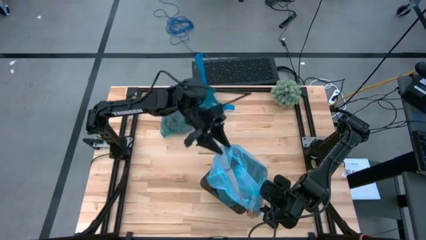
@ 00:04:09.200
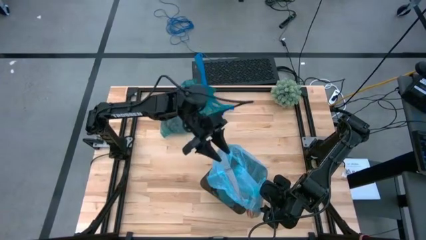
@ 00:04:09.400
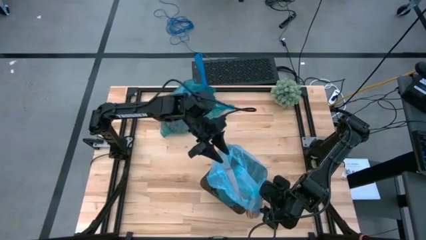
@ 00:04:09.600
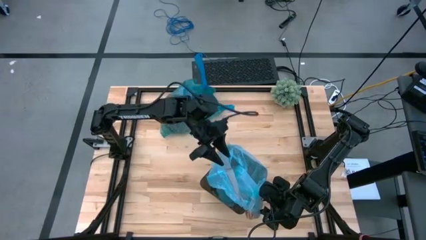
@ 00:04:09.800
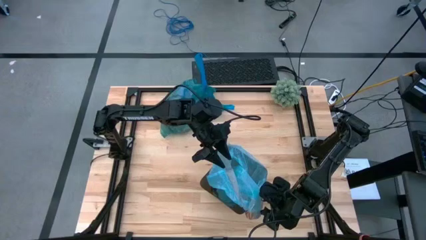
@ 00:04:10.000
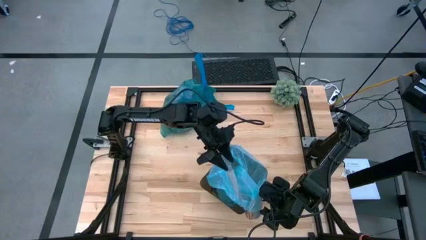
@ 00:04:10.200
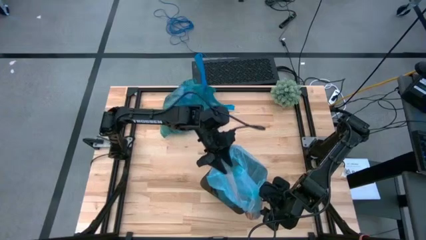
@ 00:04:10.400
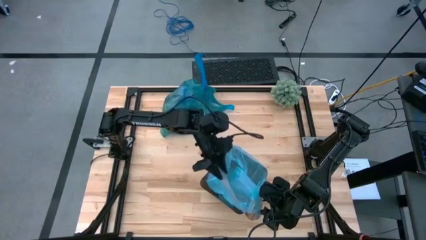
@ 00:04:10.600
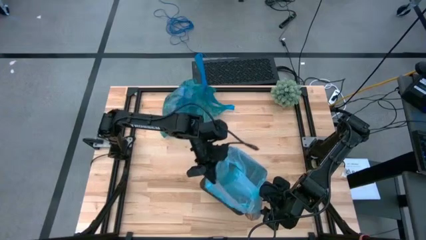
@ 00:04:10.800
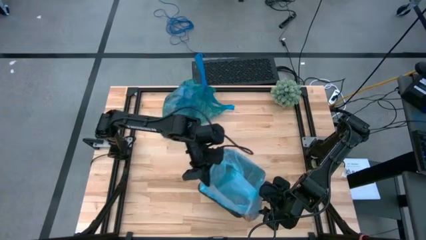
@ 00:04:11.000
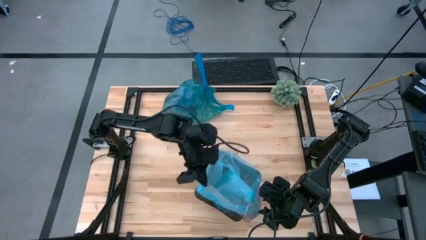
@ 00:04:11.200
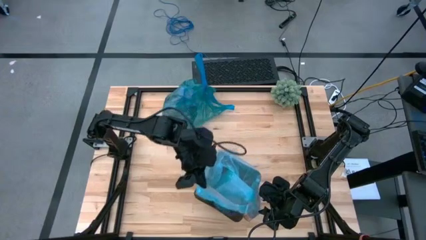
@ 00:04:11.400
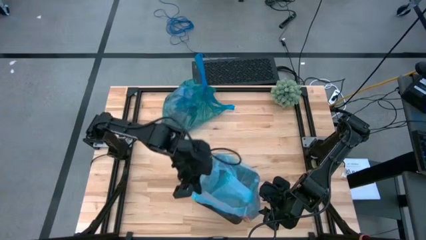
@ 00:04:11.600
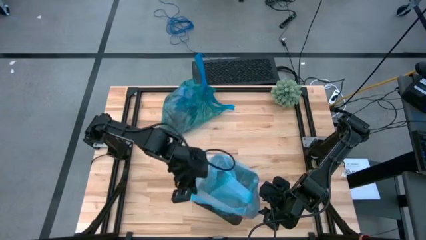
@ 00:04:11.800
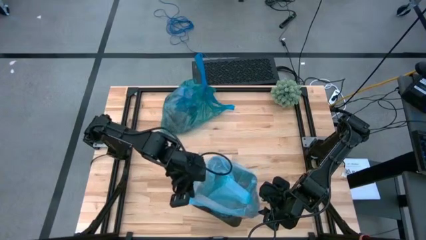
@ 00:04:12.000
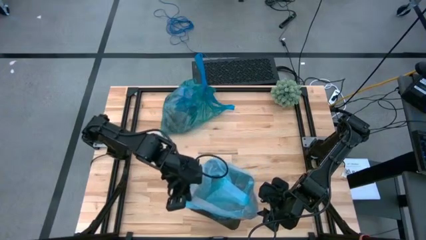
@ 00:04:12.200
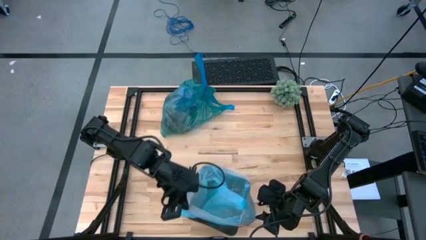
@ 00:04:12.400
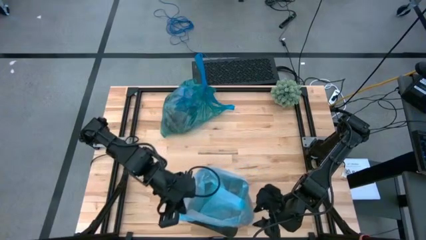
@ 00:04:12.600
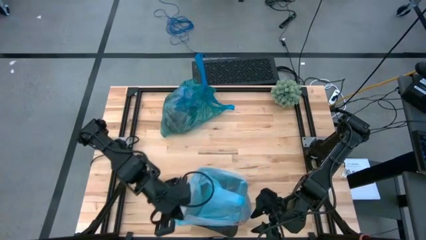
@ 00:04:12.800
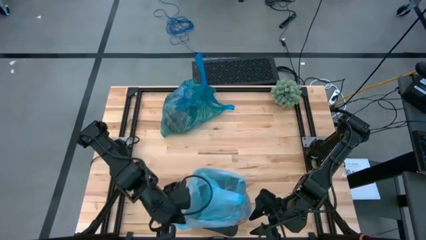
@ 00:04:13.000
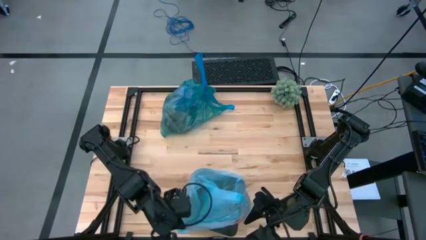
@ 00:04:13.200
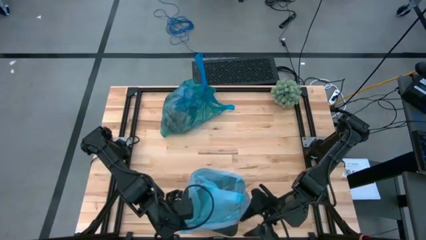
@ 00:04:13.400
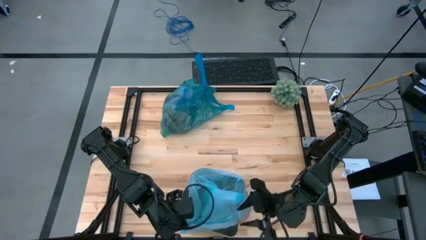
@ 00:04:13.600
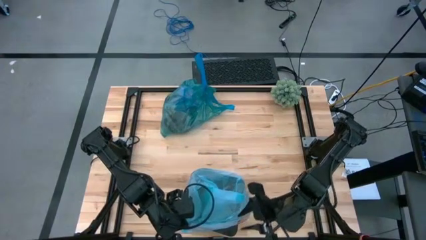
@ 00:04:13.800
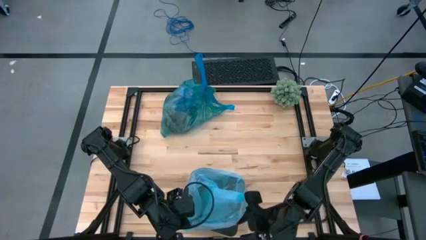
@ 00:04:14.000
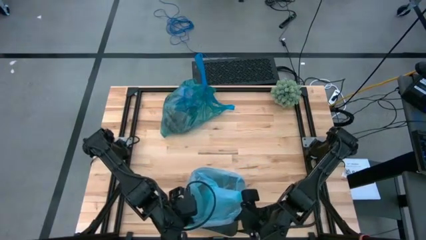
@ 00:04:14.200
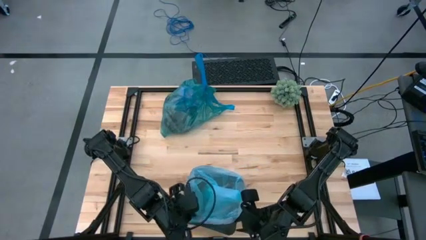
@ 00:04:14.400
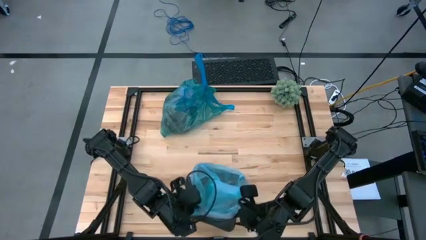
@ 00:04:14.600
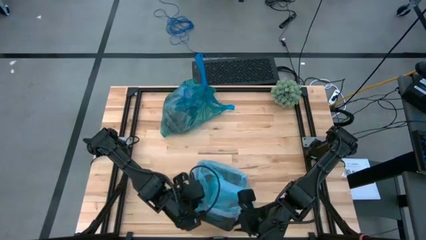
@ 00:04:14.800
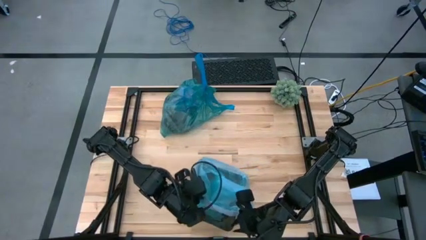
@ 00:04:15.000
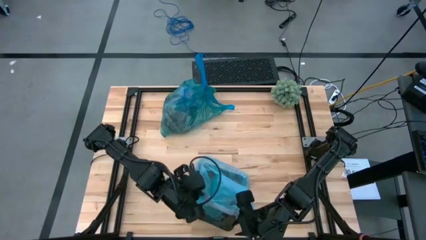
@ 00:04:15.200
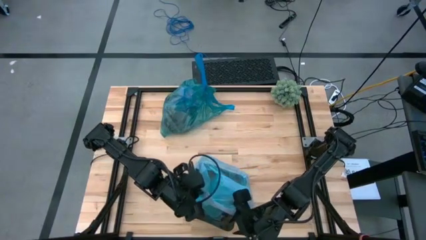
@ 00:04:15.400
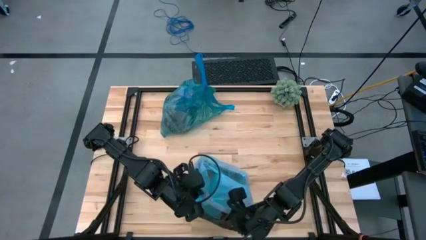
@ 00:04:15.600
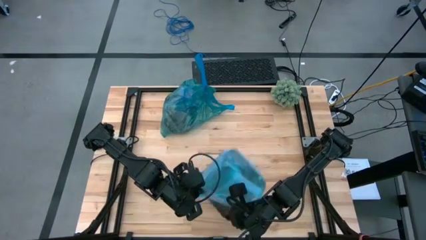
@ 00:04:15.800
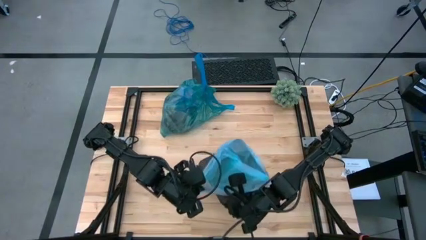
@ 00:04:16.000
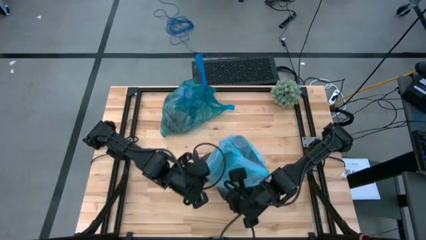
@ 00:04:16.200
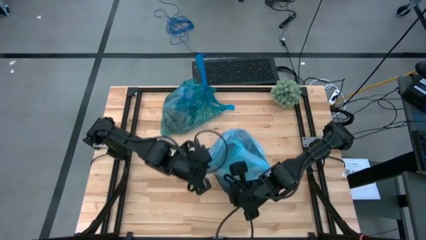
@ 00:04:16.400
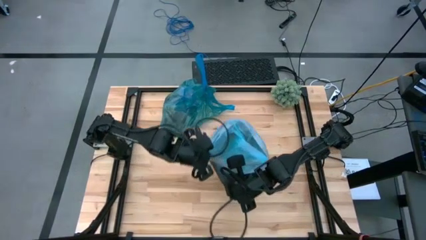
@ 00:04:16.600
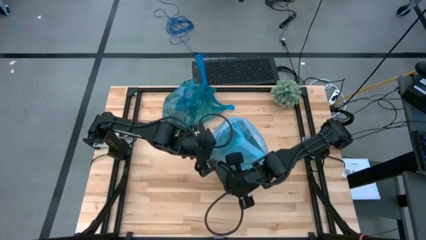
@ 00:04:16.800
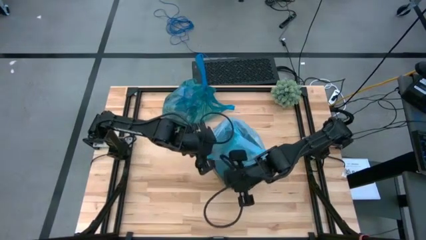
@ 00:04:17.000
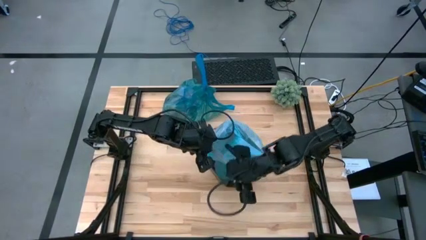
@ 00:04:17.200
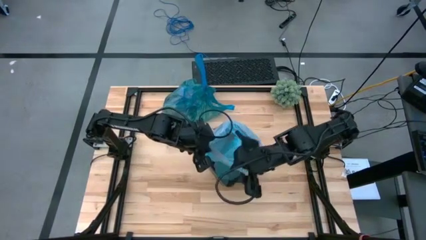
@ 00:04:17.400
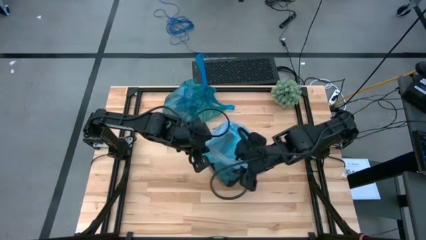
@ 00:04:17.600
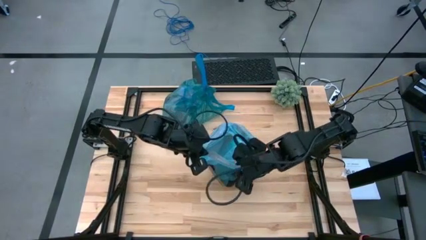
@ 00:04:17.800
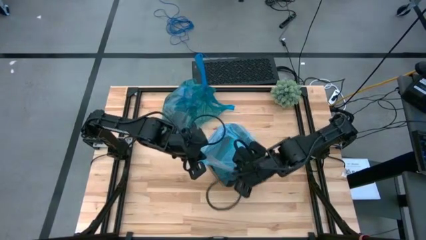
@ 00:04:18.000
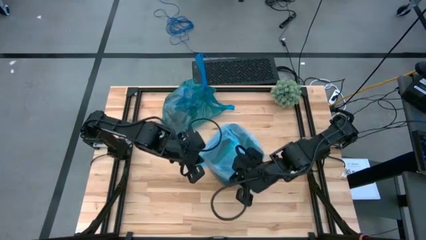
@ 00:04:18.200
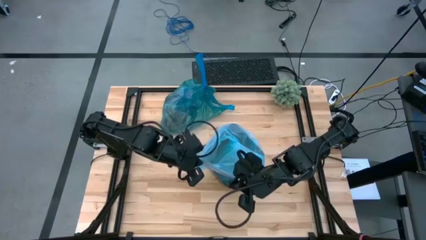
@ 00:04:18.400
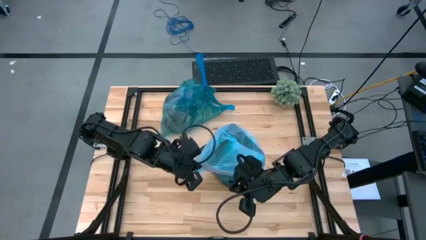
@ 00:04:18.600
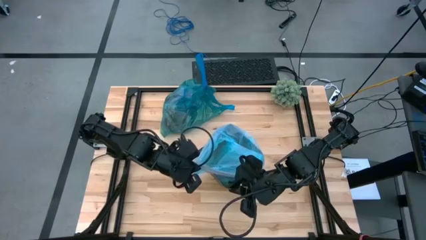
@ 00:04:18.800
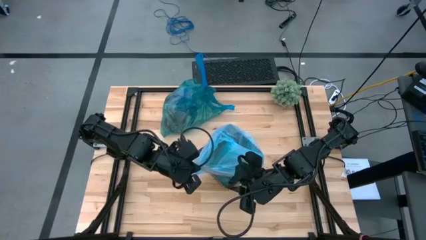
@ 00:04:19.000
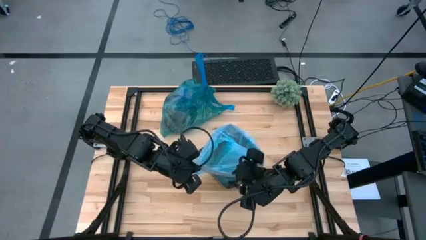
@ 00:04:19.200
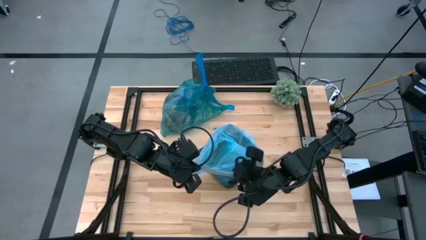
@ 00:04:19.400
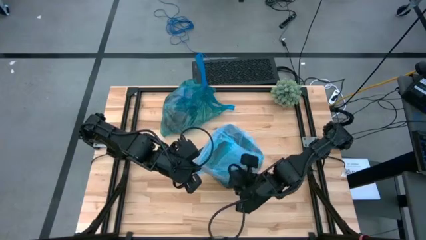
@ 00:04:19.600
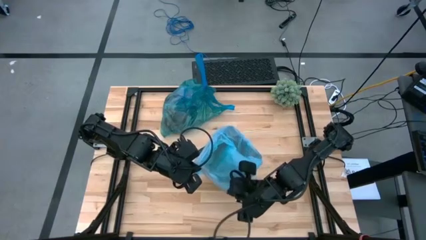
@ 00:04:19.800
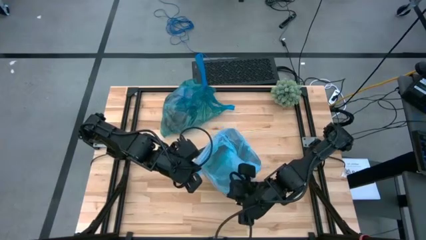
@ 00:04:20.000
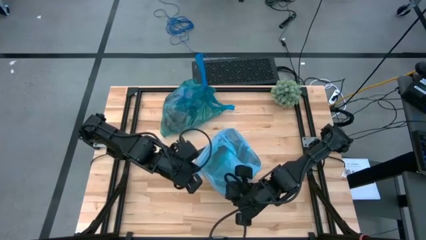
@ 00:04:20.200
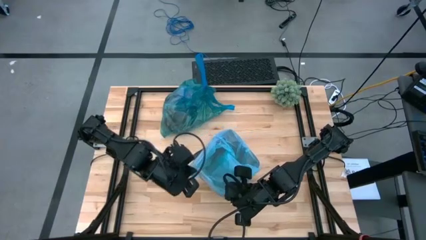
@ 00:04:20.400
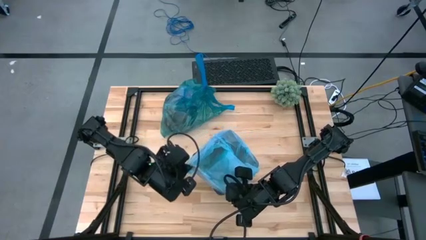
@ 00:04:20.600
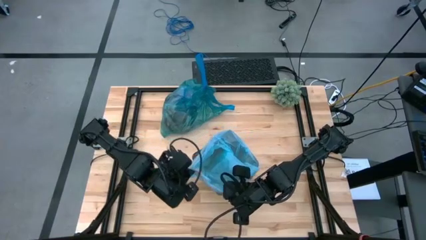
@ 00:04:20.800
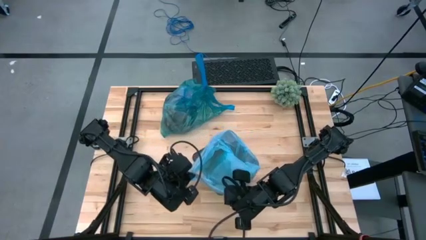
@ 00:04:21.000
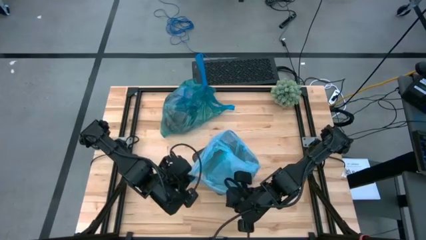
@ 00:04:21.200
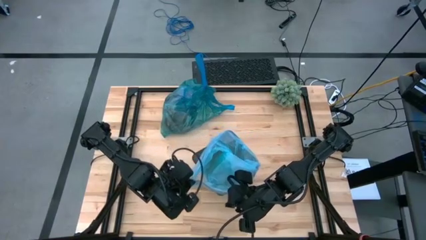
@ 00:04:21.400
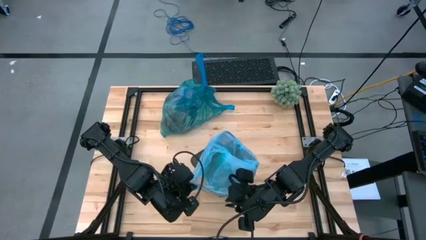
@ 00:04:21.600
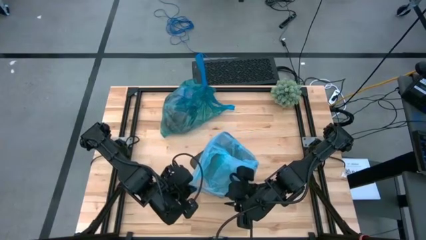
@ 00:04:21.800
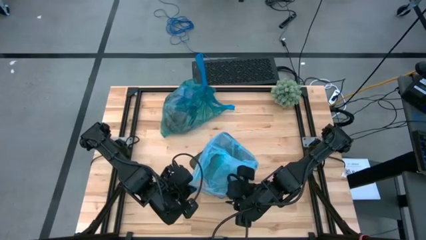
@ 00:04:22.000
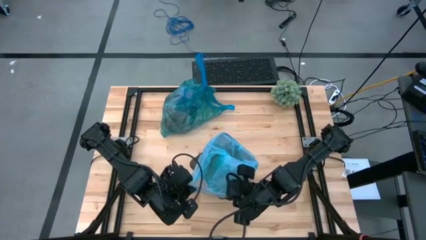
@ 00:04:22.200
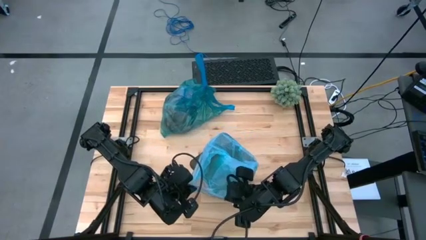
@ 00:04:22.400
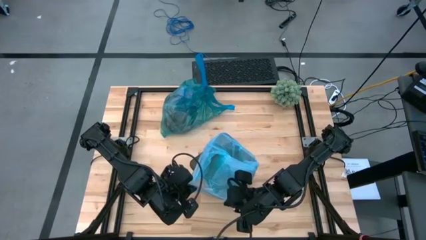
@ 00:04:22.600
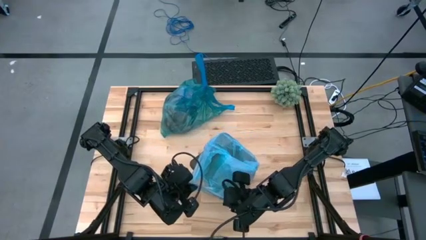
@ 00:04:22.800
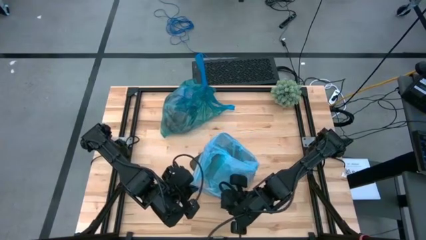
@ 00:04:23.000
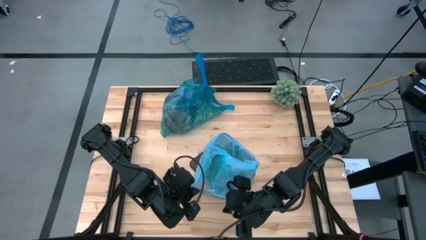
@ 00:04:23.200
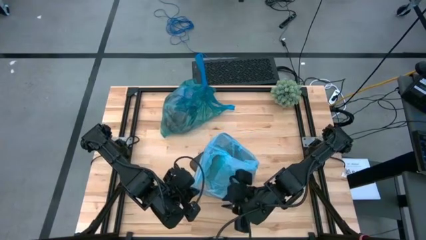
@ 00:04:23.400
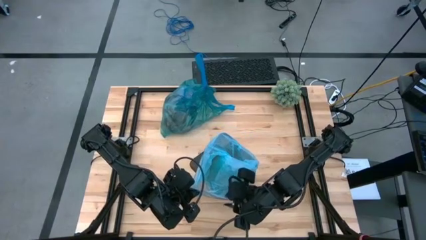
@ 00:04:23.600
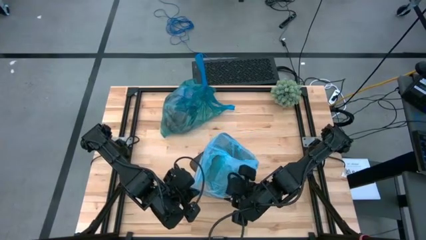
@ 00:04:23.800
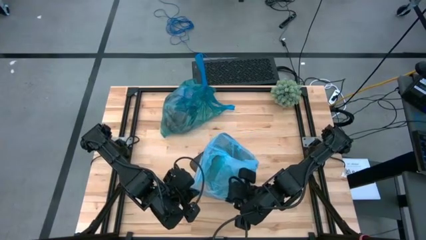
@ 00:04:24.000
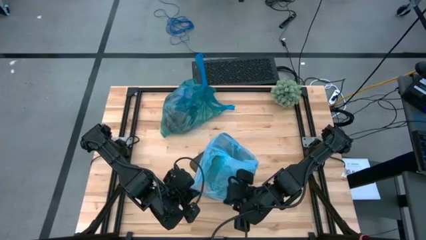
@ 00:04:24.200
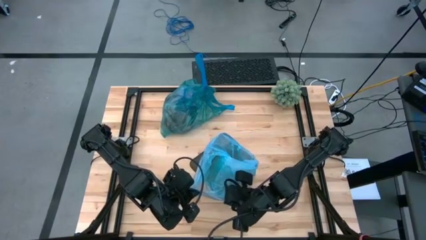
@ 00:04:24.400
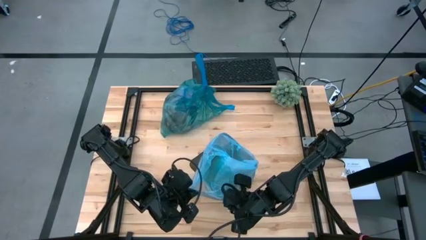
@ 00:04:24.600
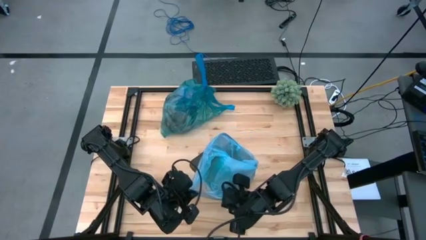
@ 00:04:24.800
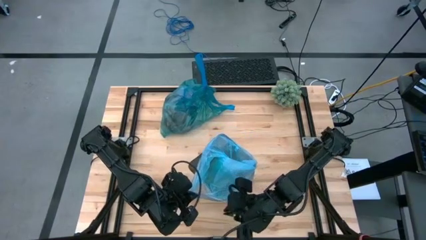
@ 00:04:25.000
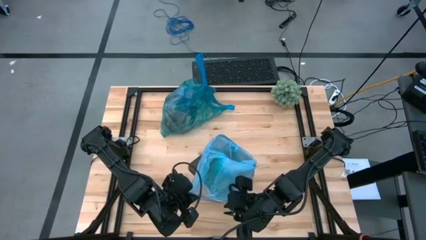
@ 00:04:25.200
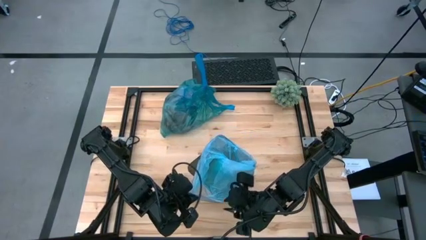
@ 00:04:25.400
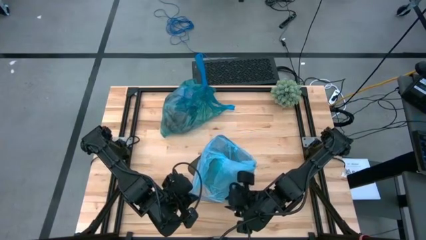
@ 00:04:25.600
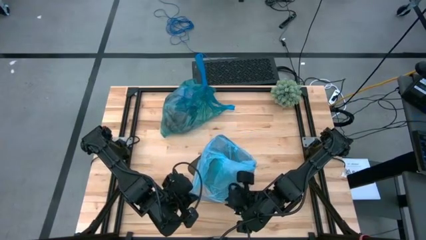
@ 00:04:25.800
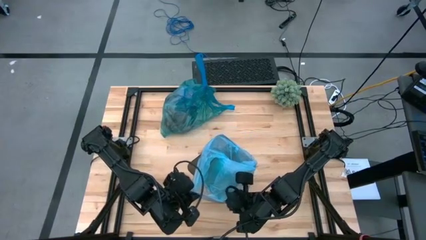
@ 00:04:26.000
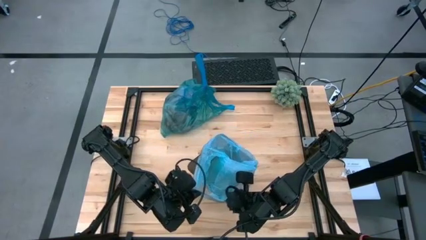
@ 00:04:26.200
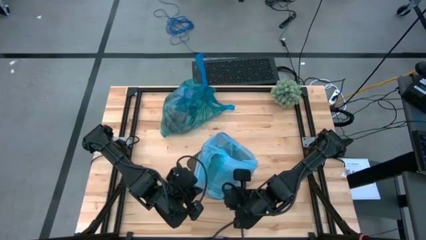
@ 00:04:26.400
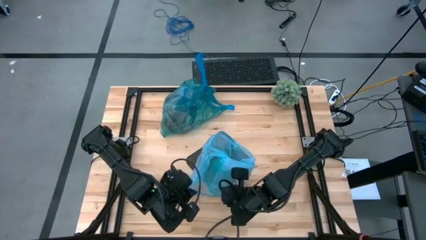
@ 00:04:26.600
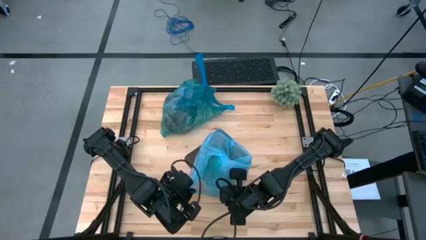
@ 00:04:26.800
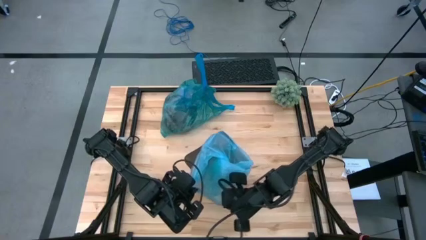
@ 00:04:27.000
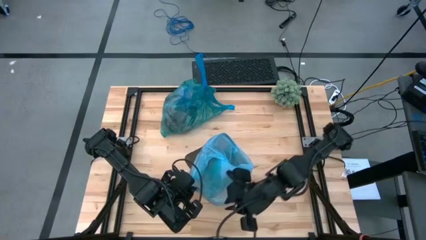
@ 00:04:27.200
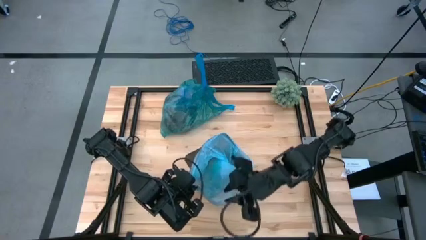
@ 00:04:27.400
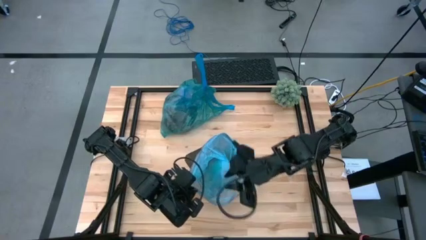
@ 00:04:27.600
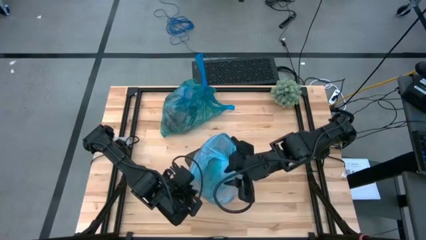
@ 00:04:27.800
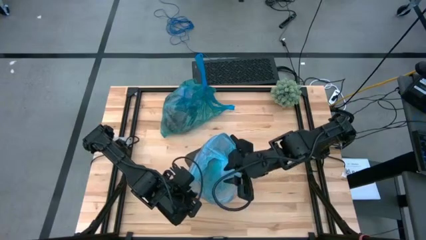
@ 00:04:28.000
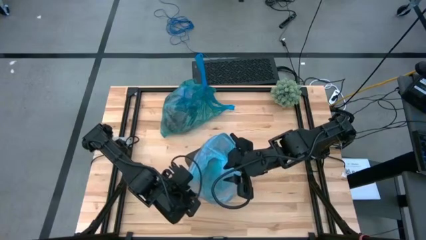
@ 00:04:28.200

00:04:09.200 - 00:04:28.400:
Task: place trash/remove bag and relplace
Insert the new trash bag into the trash bin
